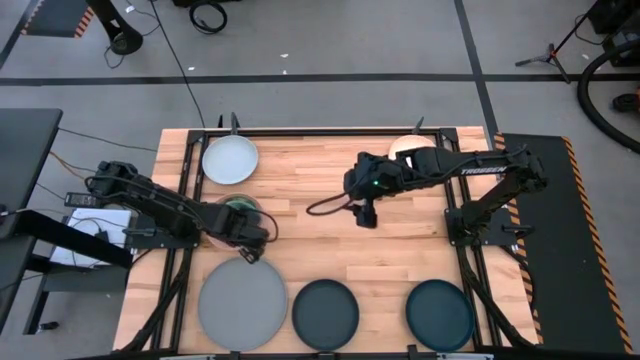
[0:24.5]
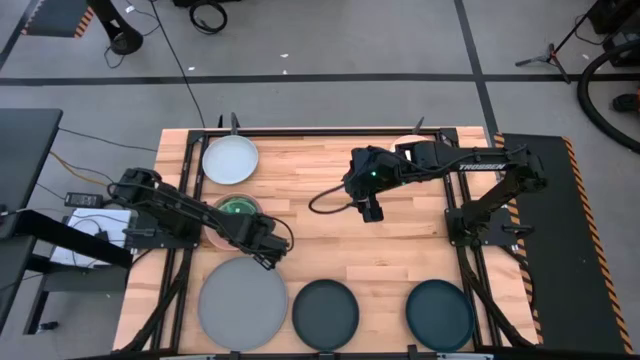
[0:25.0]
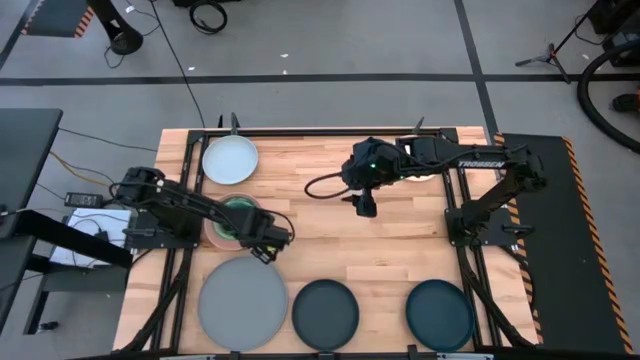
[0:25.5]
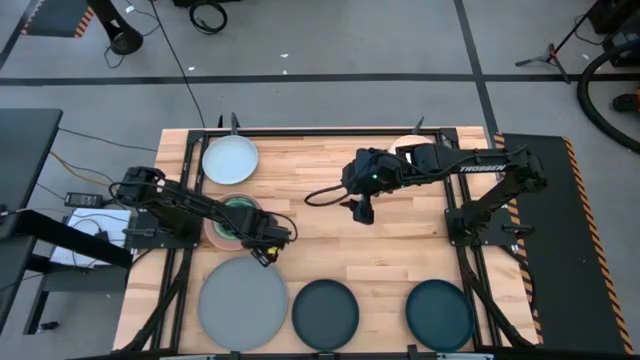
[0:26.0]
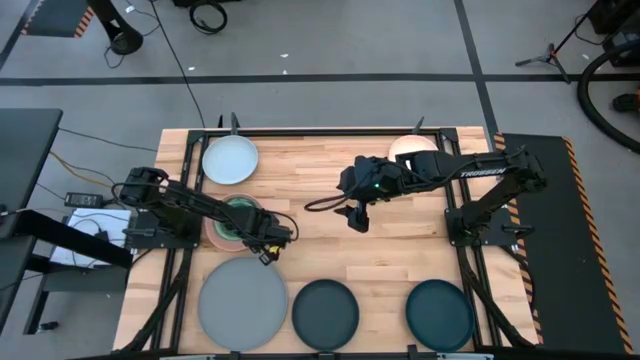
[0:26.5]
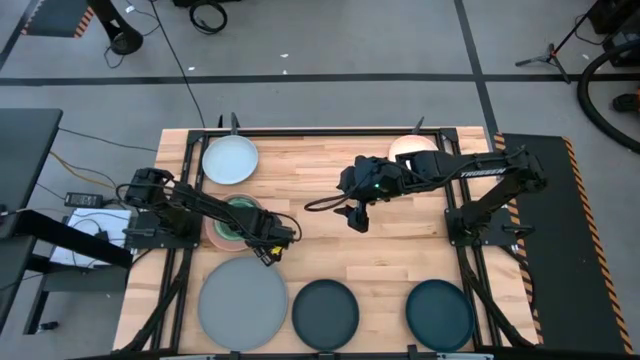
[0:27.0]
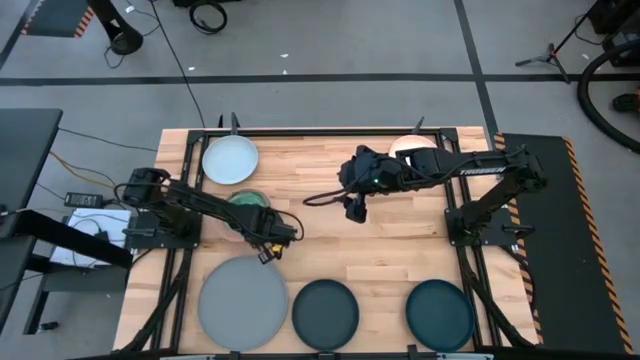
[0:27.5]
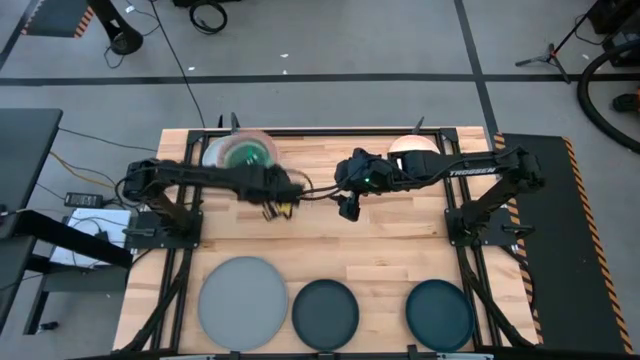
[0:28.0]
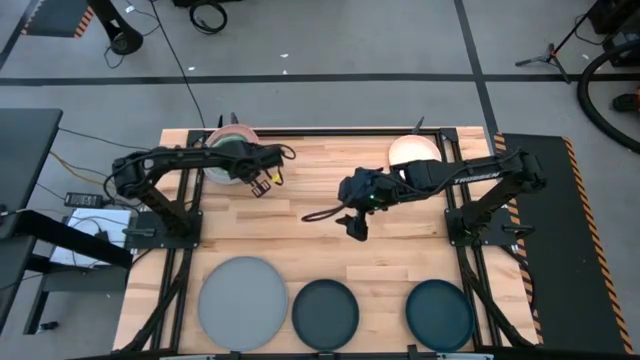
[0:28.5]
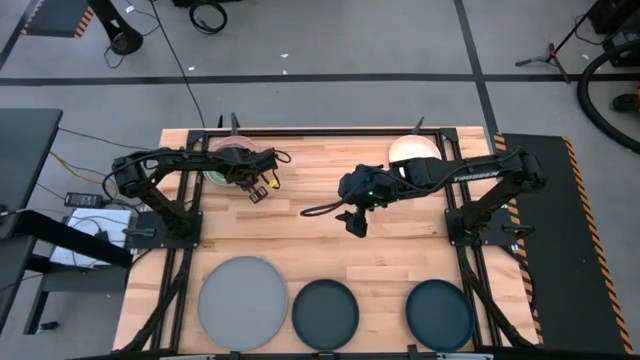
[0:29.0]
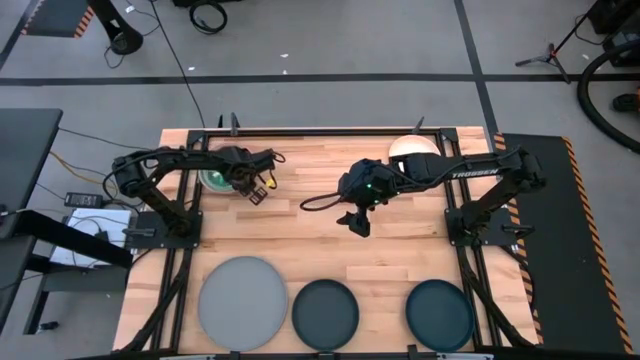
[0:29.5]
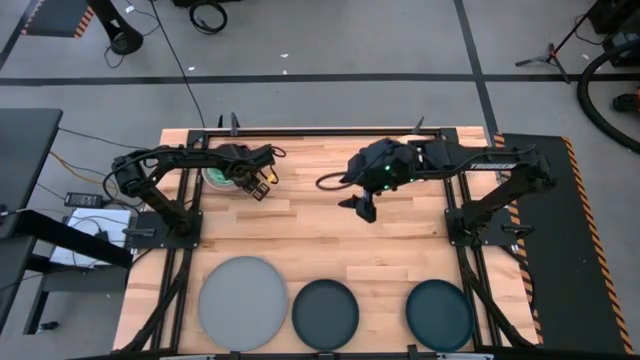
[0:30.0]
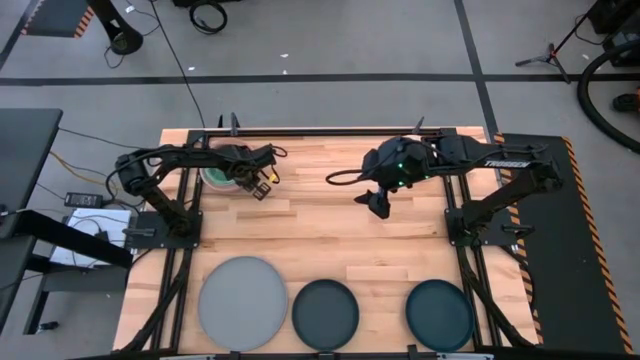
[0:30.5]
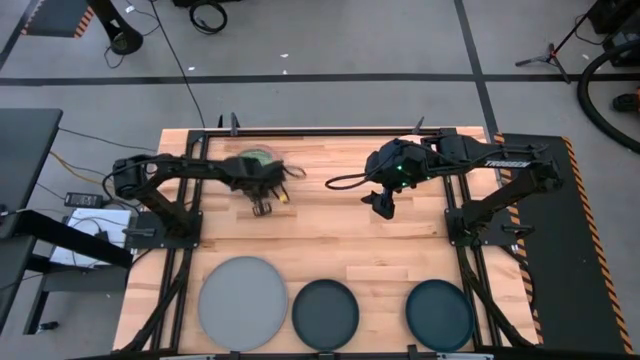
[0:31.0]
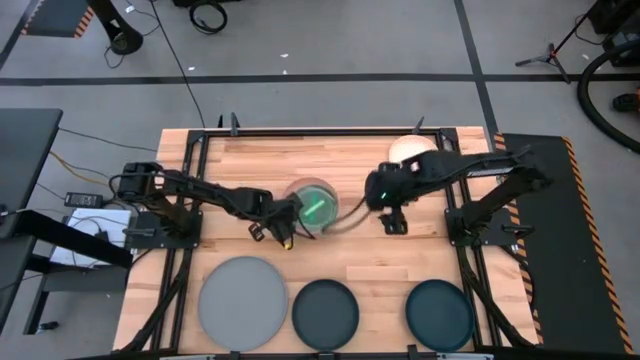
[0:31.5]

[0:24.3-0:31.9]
Task: Stack plastic plates
Stack the stacked plates on top of the light blue plate

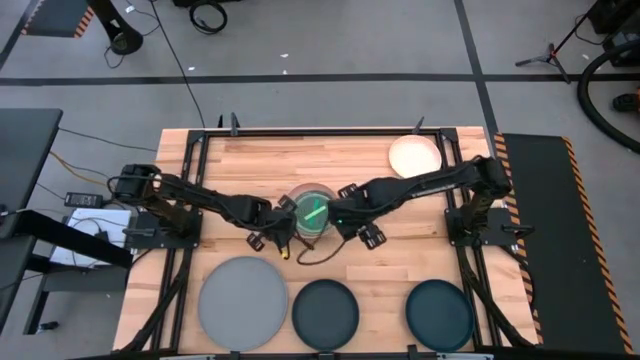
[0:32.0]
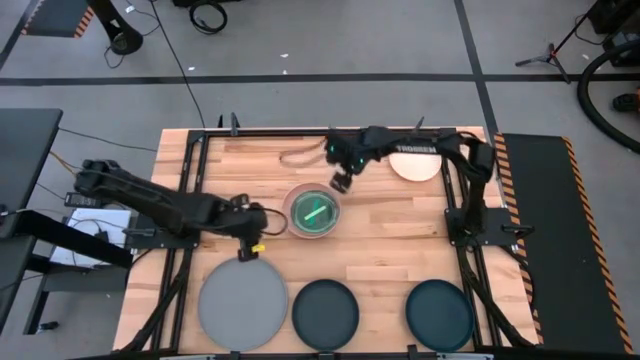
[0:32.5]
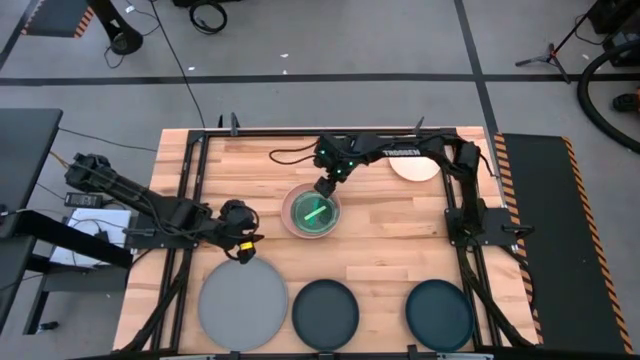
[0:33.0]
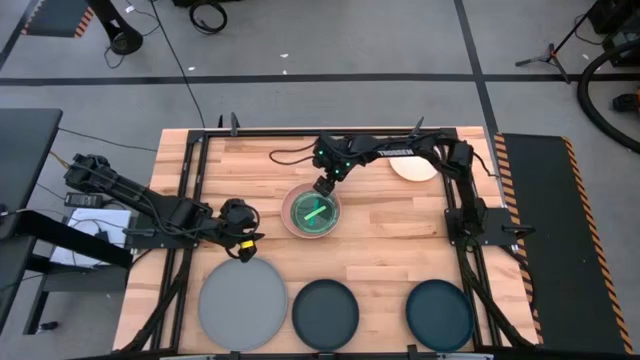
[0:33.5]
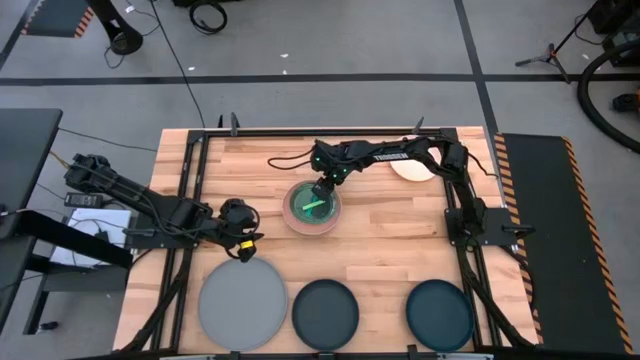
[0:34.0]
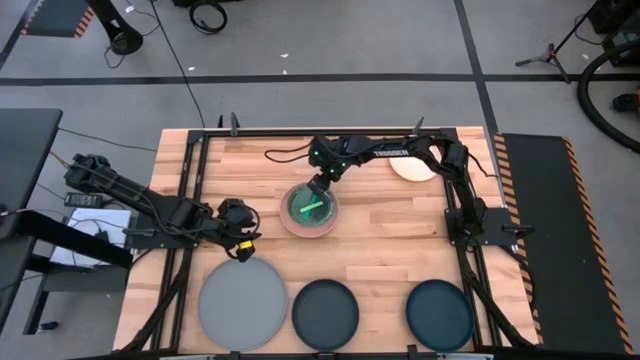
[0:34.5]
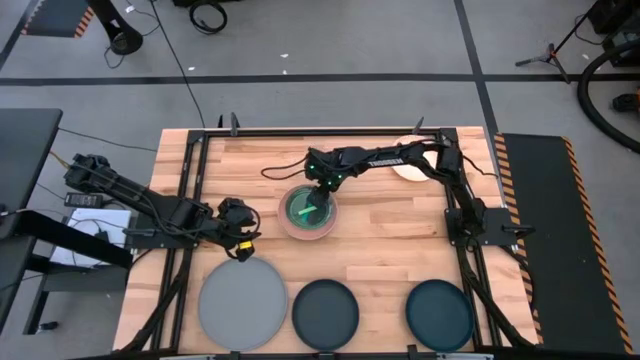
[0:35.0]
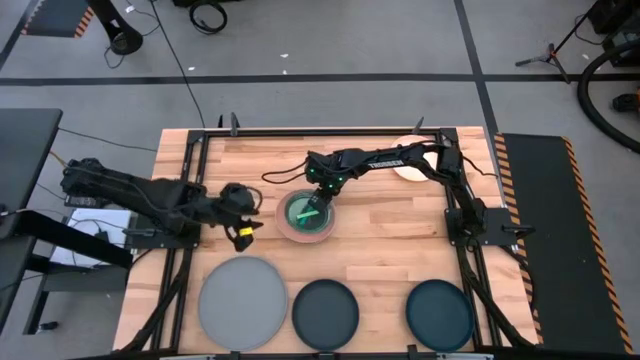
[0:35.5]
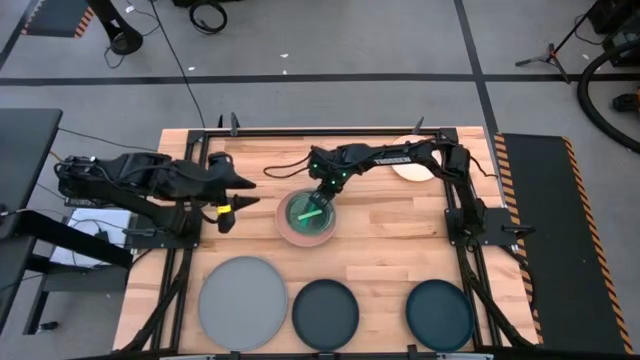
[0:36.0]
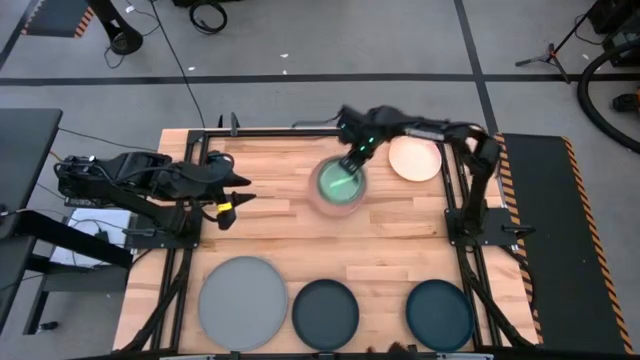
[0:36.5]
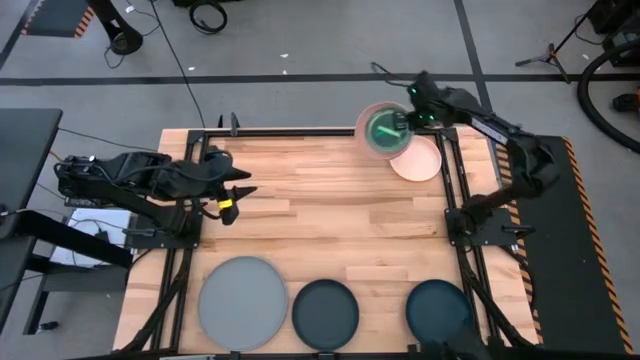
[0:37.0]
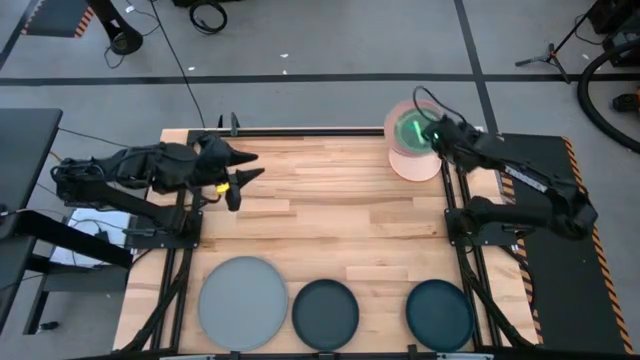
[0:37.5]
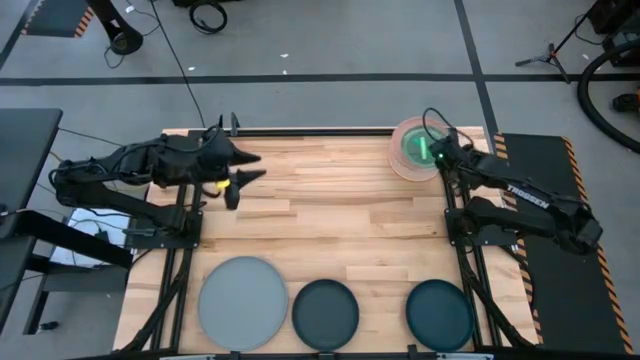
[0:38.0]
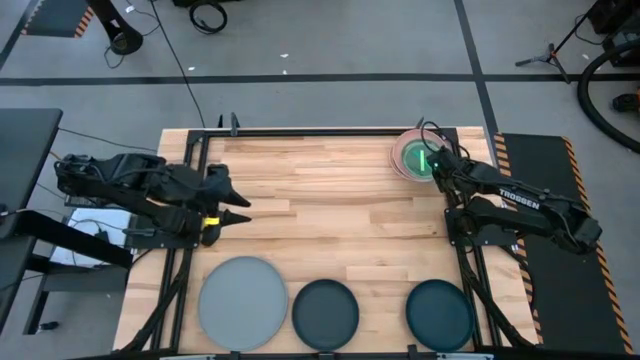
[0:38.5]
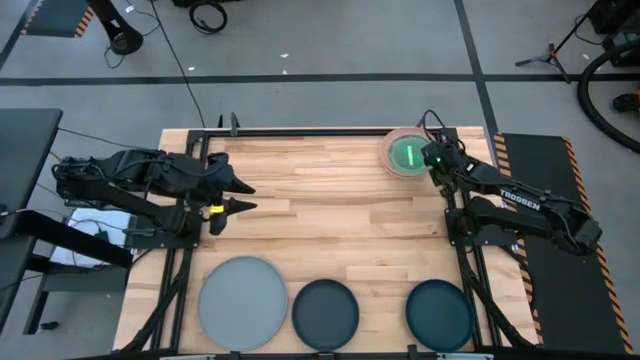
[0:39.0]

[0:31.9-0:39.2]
Stack the stacked plates on top of the light orange plate

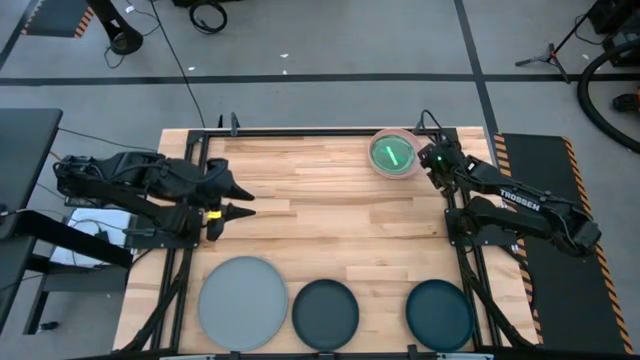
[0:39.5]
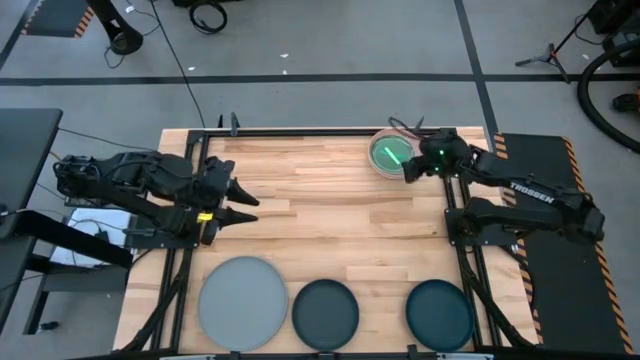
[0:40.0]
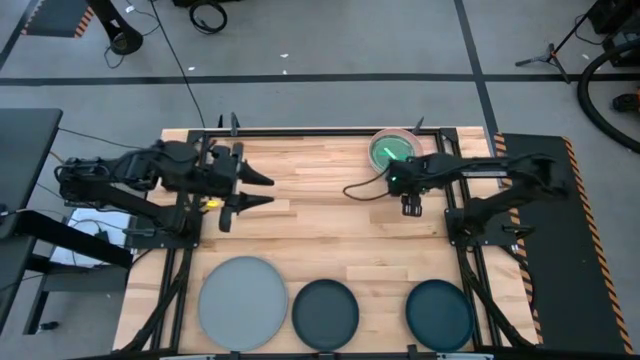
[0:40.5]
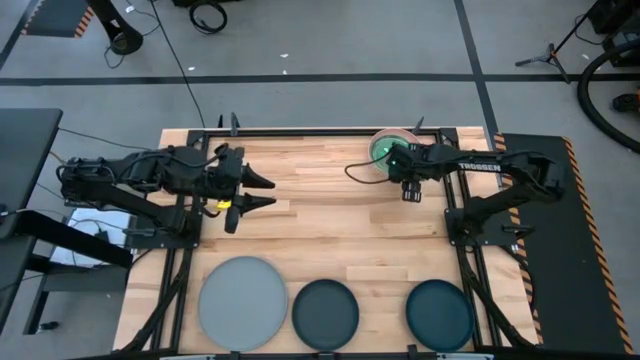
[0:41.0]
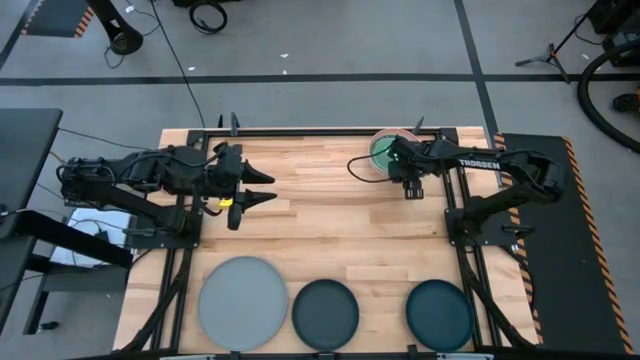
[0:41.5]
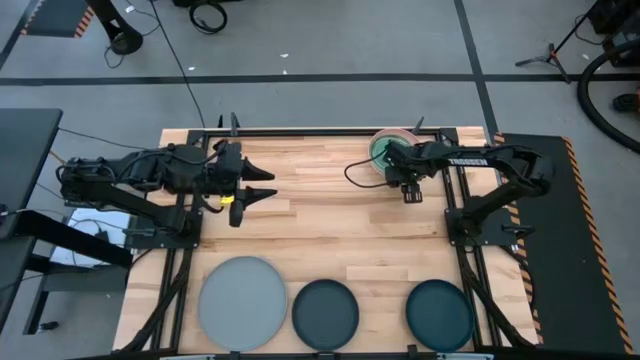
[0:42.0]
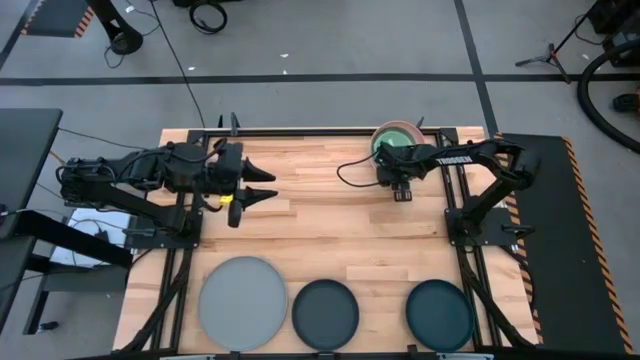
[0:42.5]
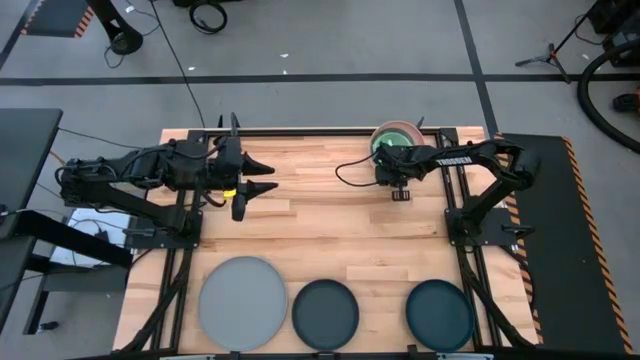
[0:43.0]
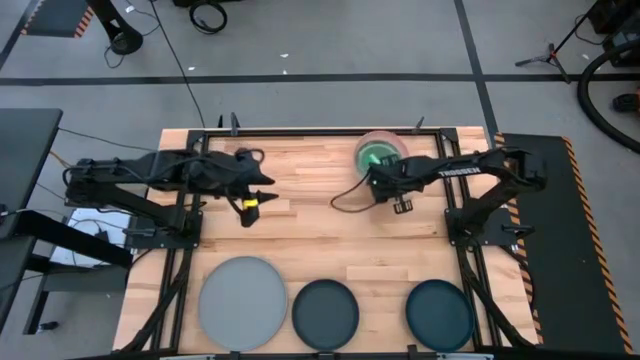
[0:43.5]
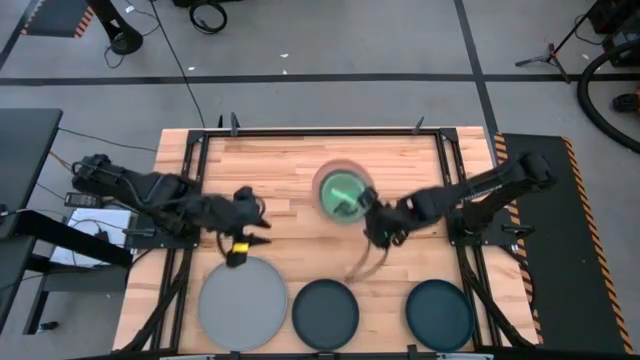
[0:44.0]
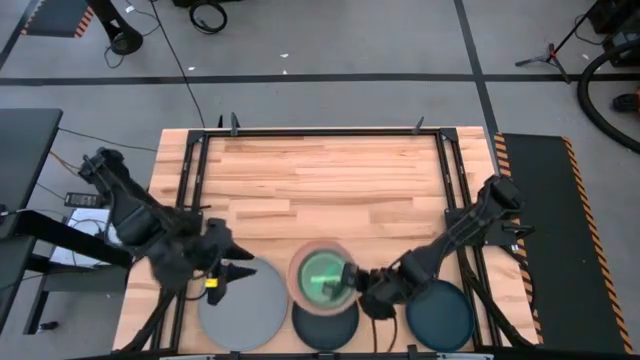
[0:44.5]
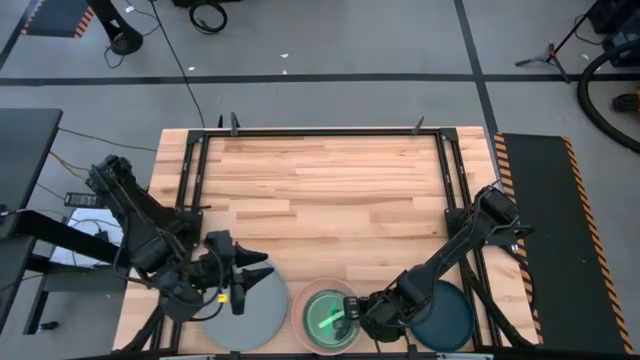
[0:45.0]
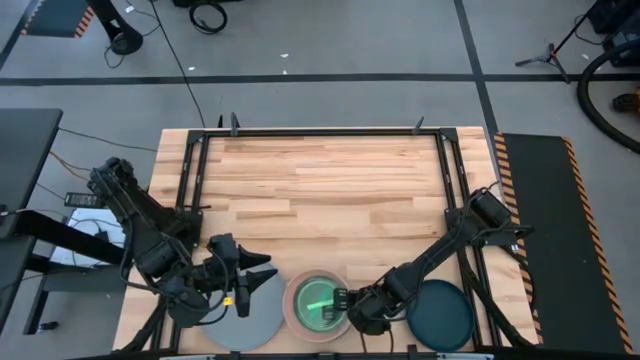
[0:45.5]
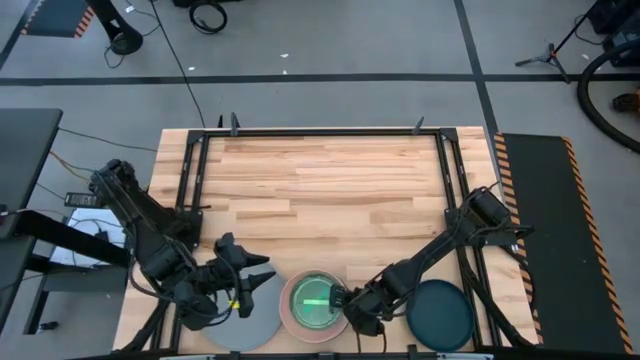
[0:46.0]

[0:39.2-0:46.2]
Stack the stacked plates on top of the black plate
